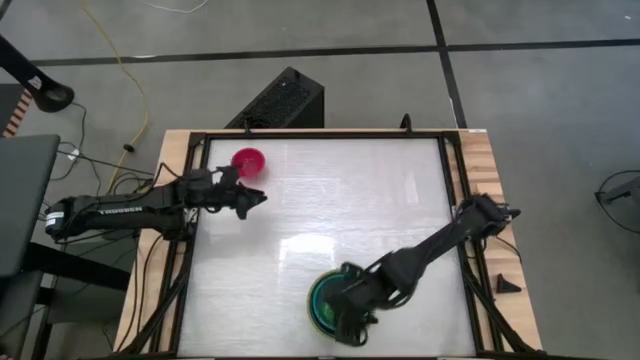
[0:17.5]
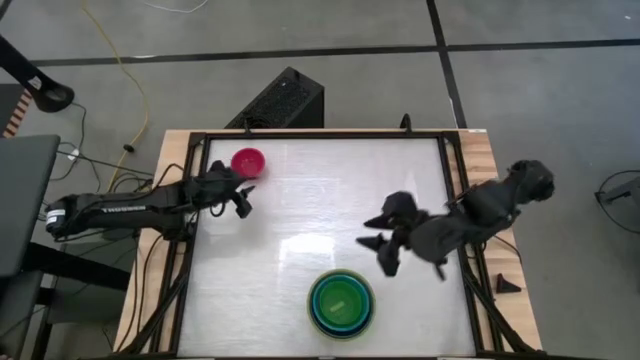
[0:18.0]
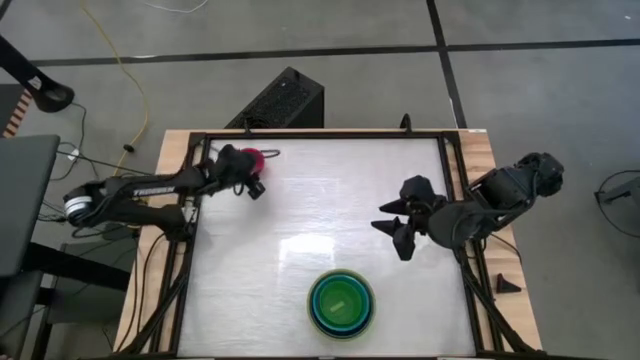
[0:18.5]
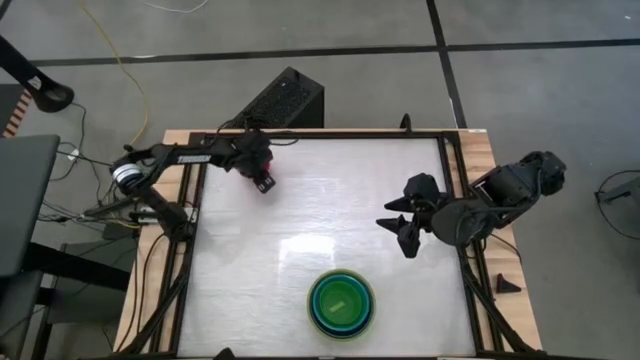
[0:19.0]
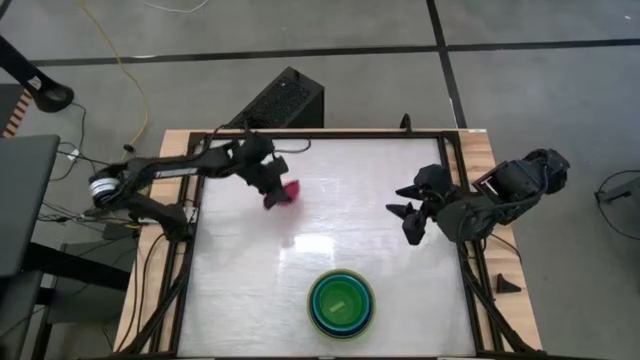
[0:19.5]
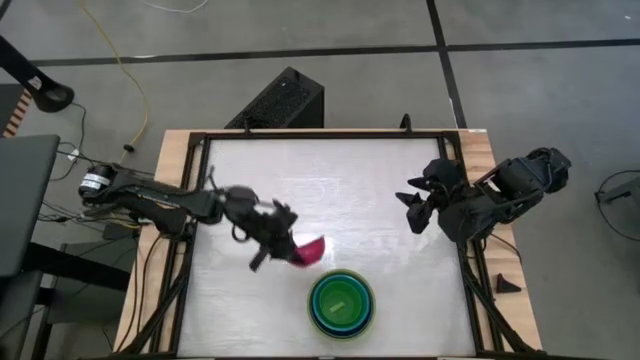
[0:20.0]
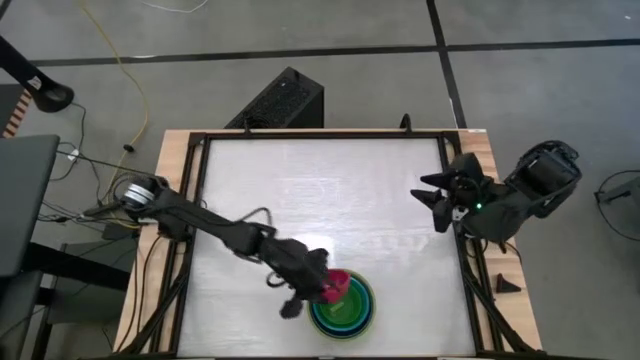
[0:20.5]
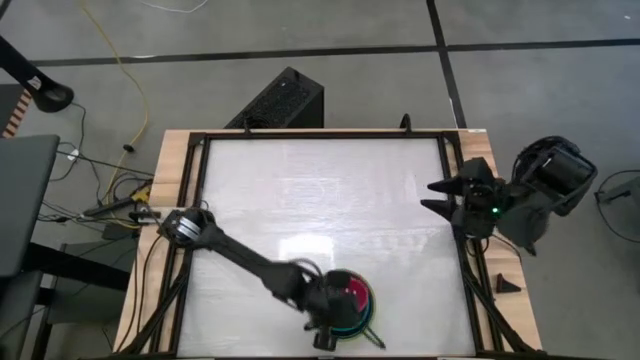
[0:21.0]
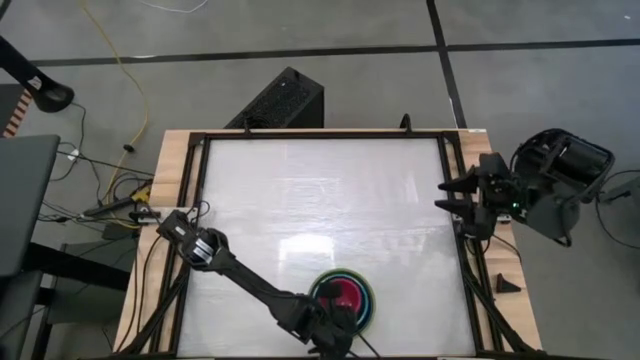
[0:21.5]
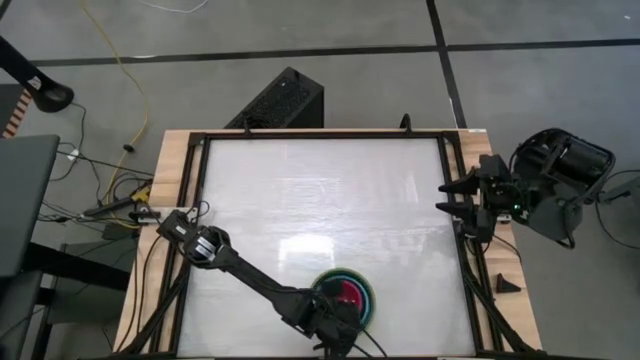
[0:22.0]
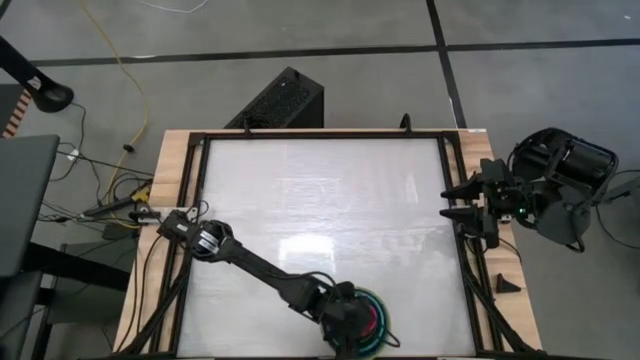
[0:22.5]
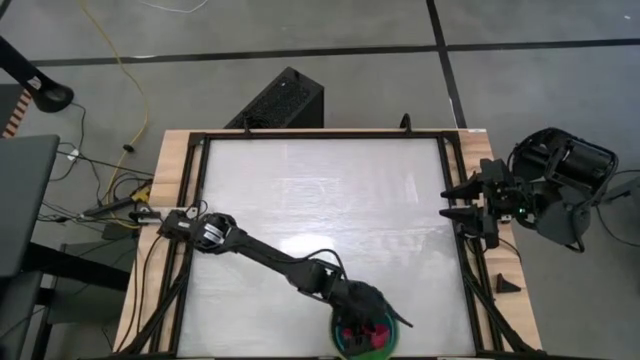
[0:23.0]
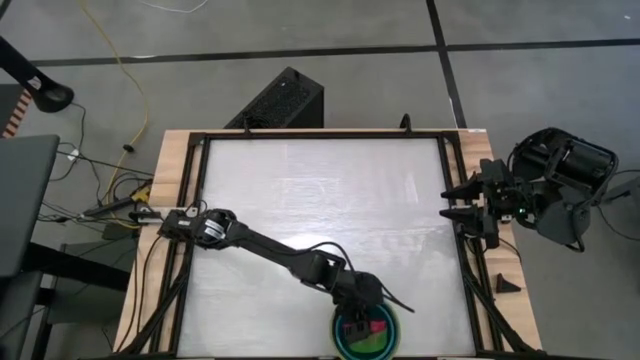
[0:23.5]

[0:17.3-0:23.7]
Stack the pink bowl into the green bowl

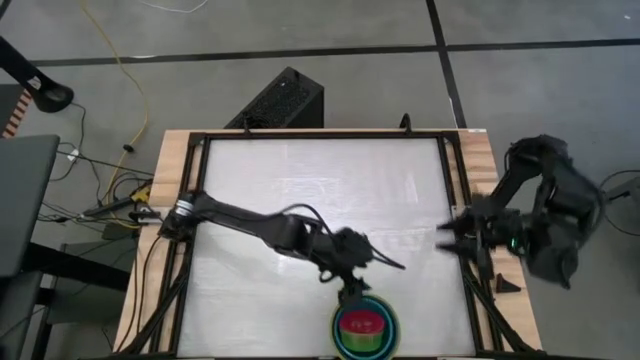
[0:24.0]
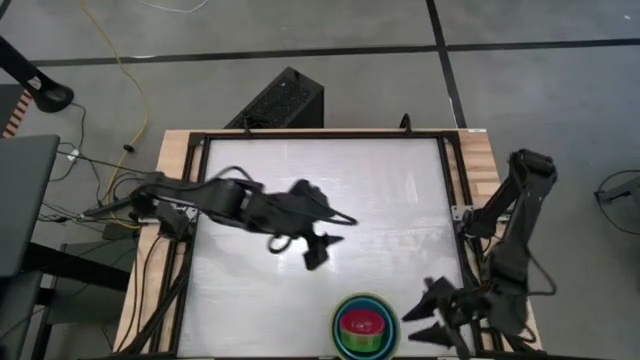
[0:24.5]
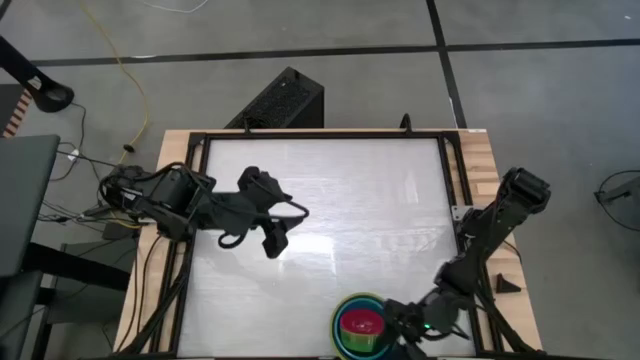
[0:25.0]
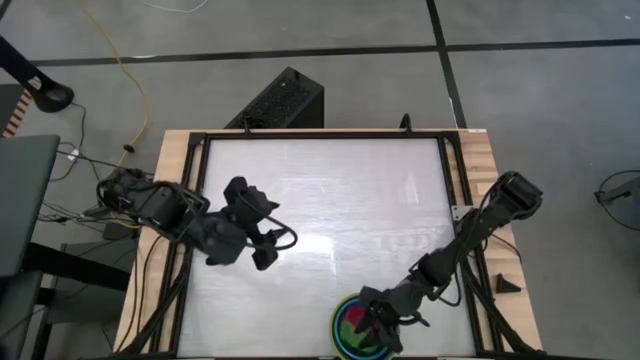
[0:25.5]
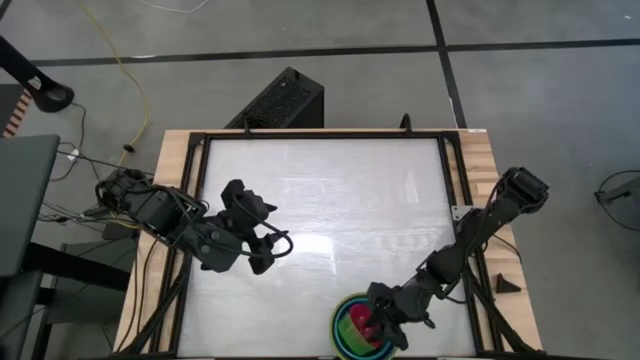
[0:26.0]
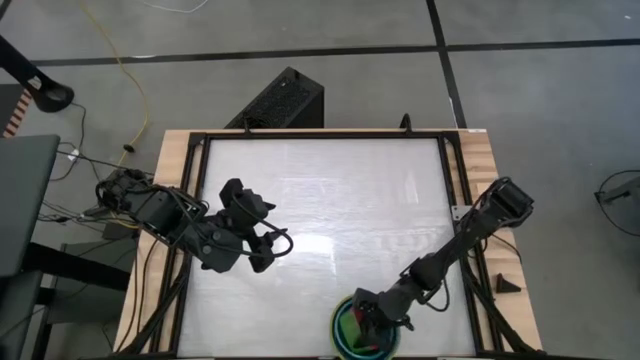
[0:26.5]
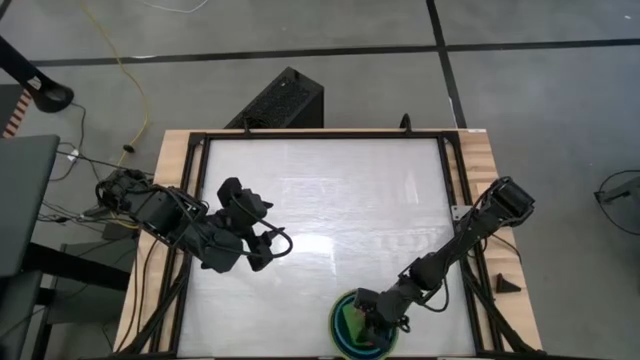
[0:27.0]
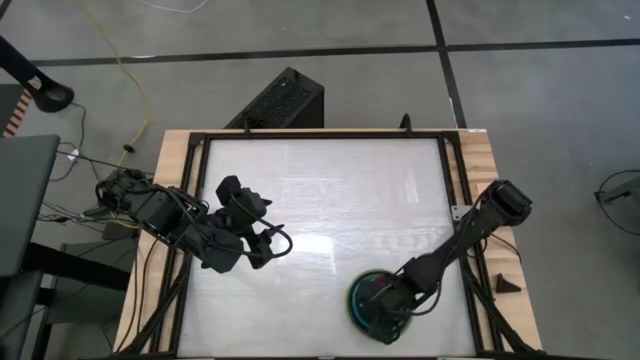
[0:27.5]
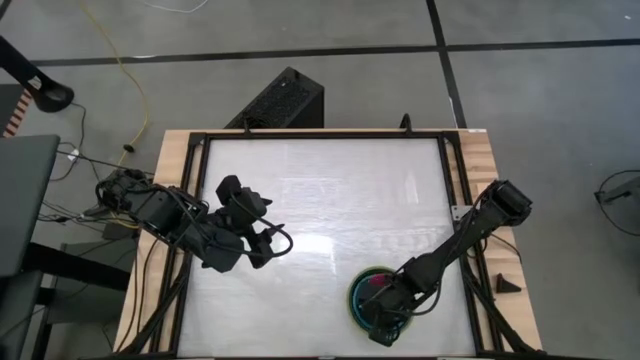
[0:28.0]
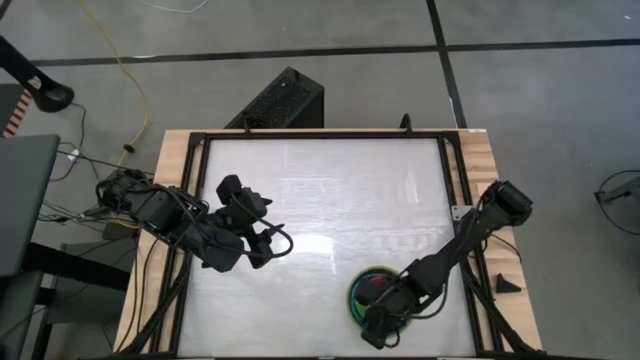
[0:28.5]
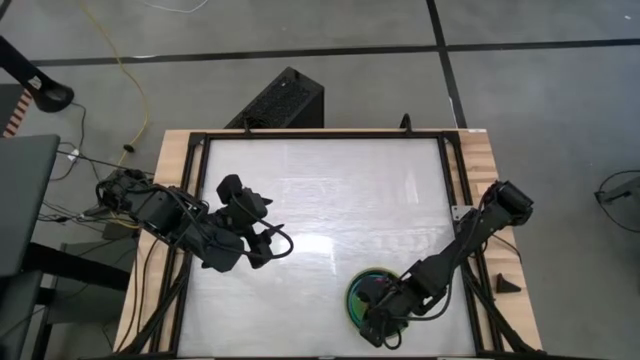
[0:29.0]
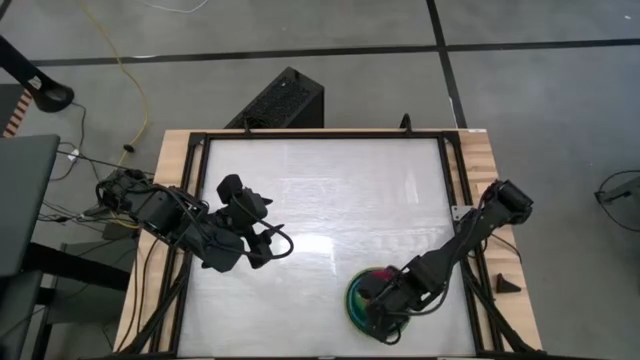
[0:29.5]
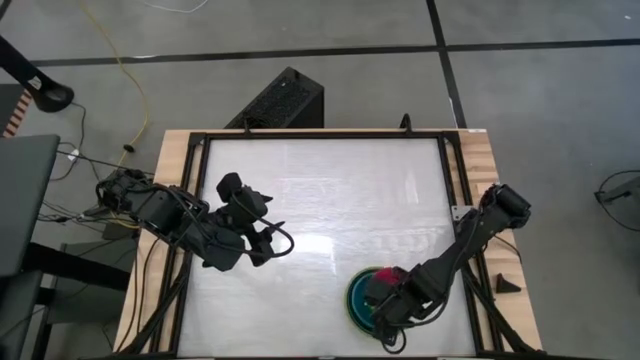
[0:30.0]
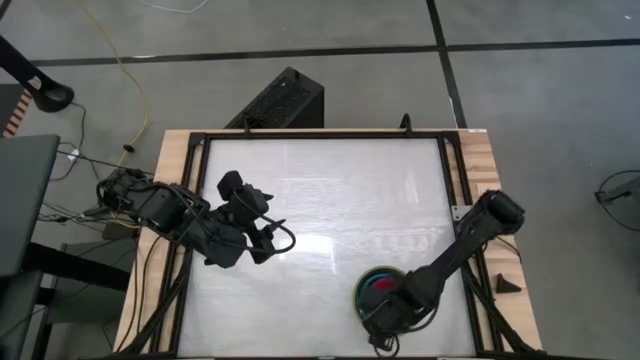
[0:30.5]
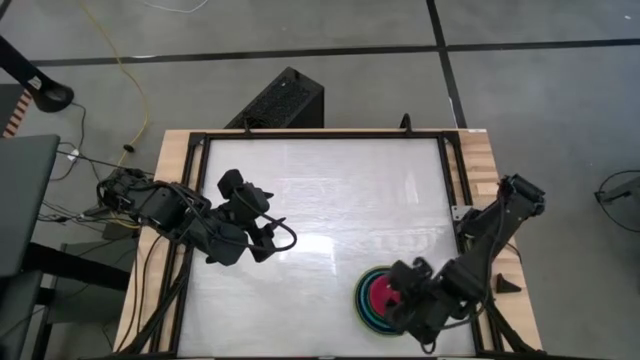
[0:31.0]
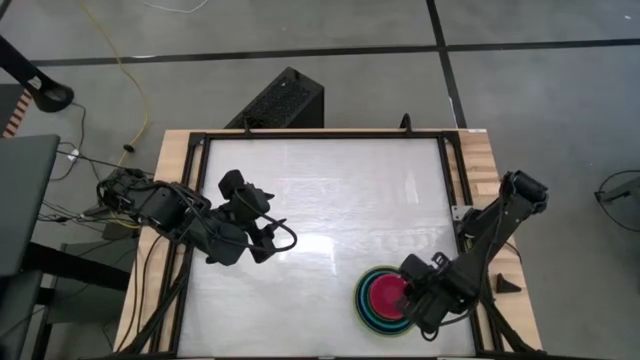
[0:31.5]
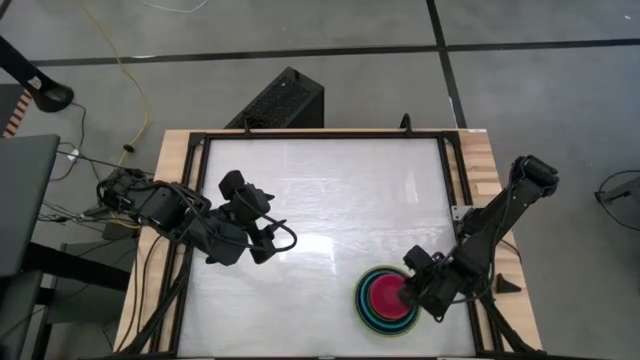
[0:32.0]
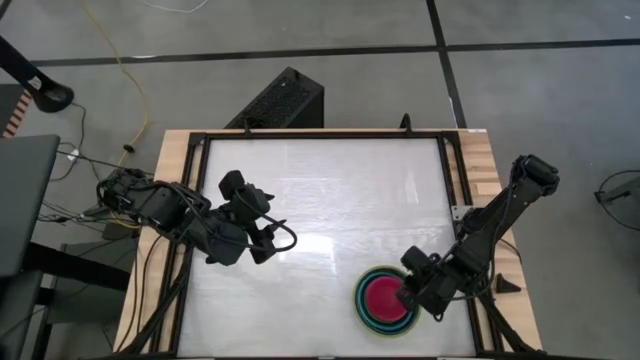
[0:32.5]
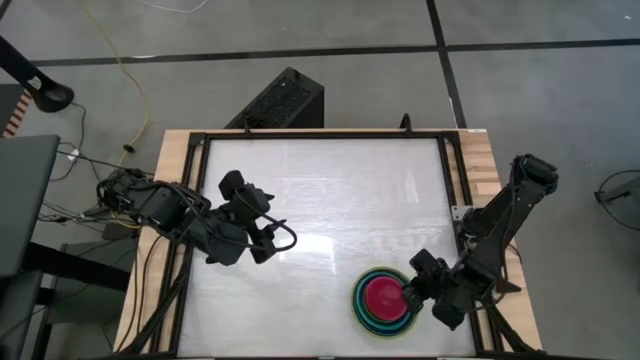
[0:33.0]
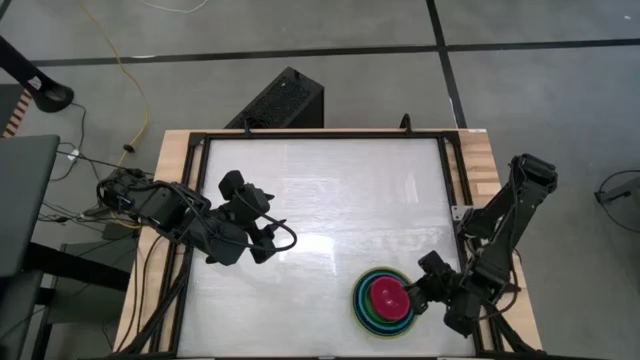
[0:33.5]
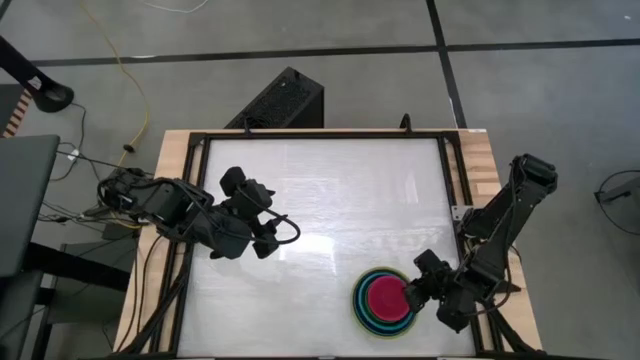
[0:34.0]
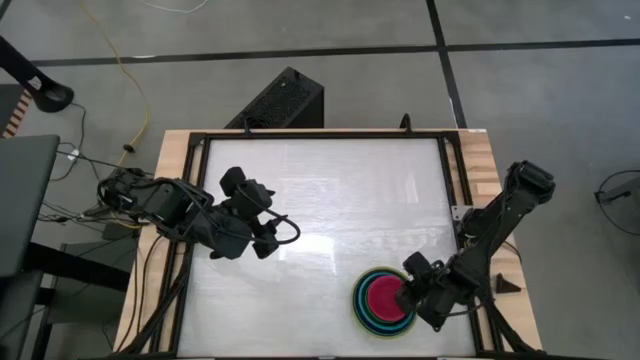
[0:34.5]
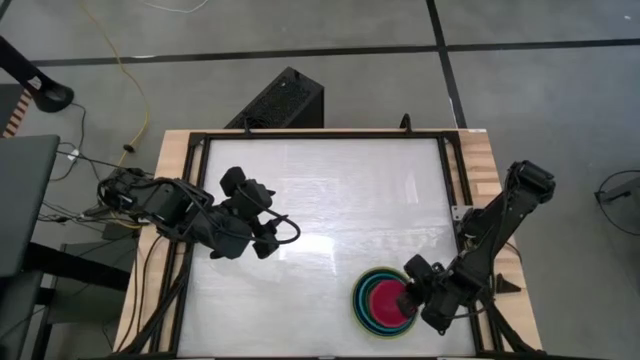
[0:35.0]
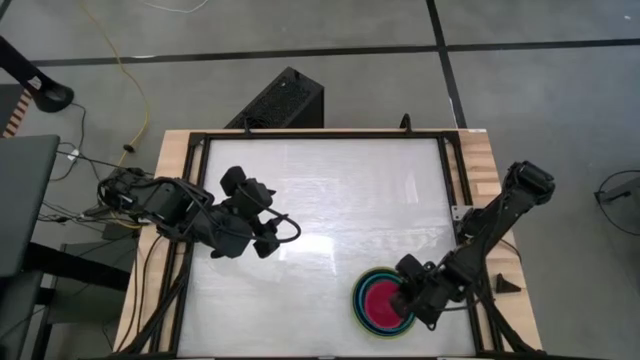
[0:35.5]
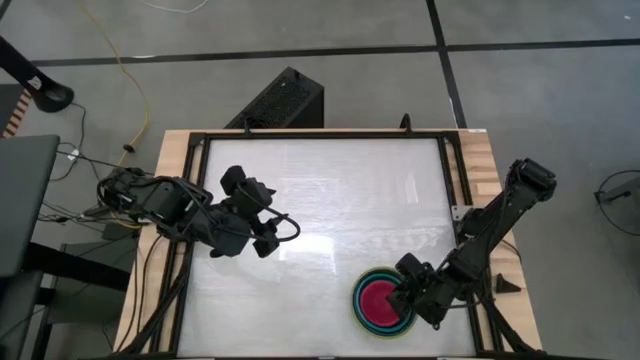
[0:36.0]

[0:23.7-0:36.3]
Adjust the green and red bowls

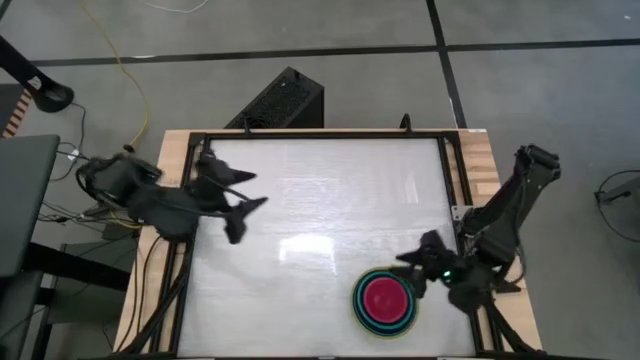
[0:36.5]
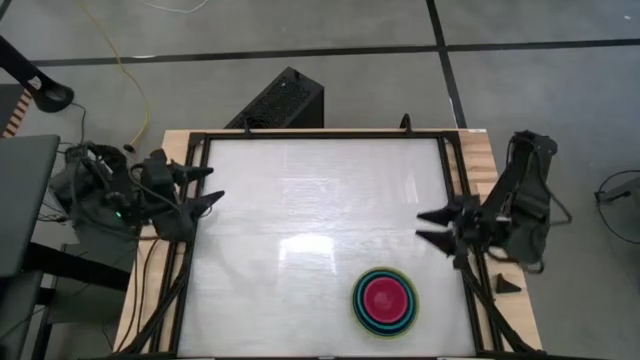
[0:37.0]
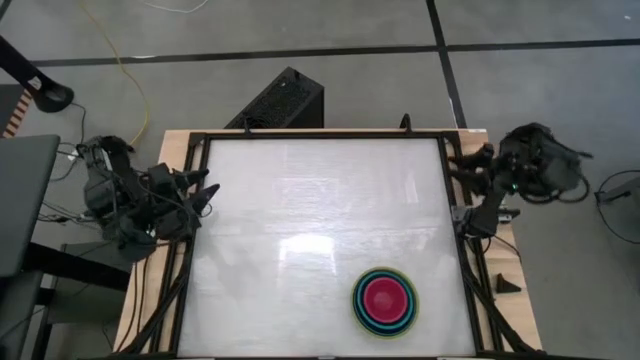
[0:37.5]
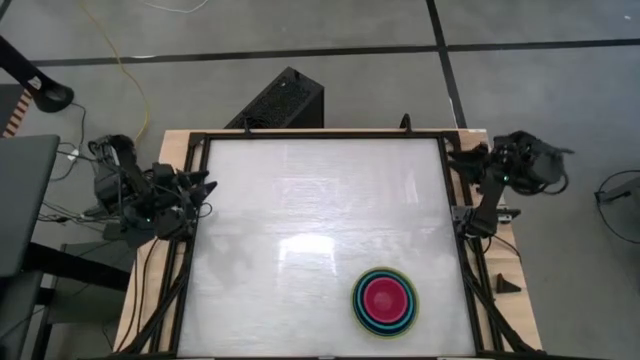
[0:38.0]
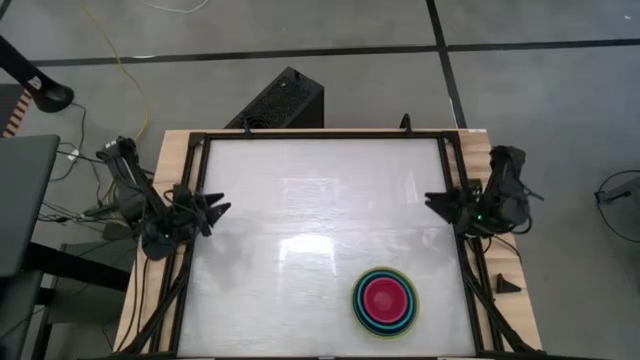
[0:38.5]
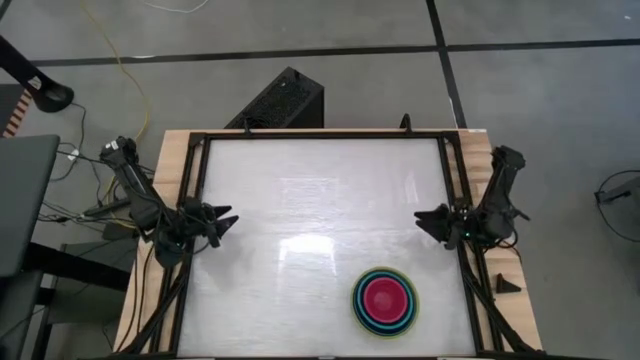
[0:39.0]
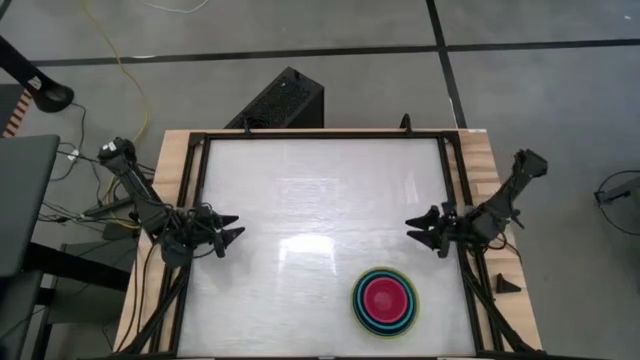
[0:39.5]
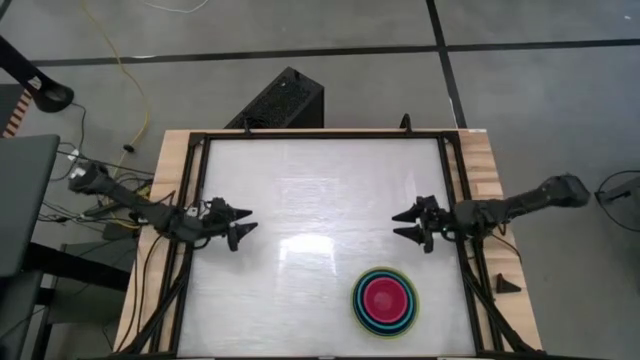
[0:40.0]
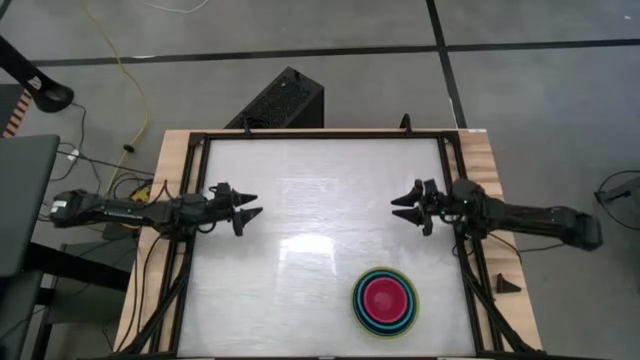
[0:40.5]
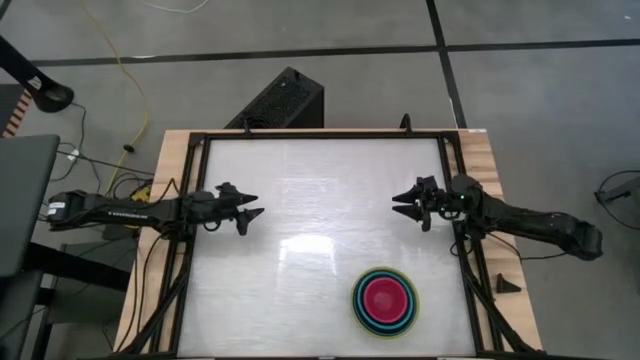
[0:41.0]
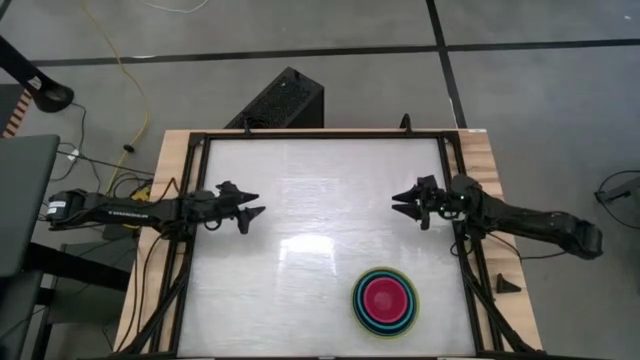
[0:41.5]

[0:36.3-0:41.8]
Return to Home Position
